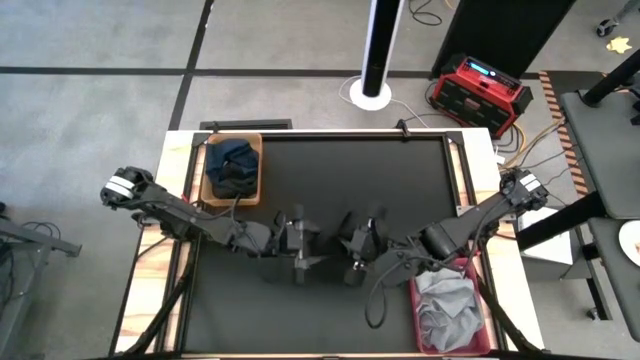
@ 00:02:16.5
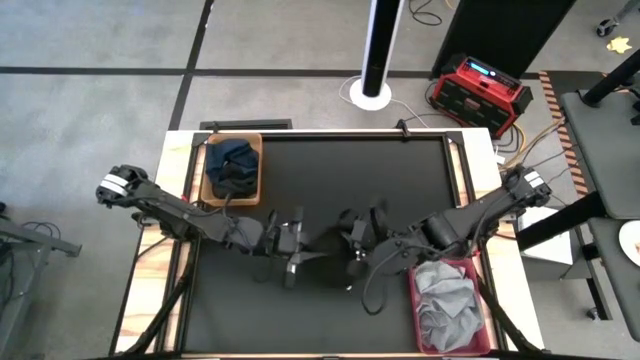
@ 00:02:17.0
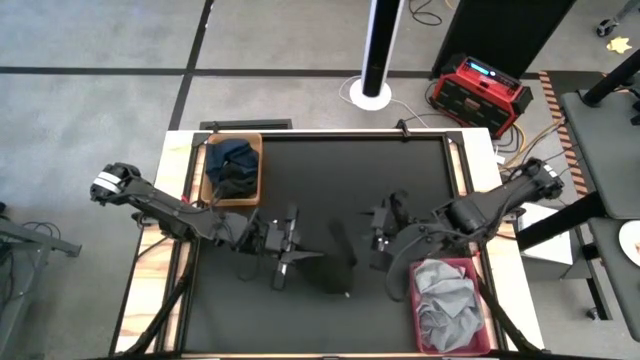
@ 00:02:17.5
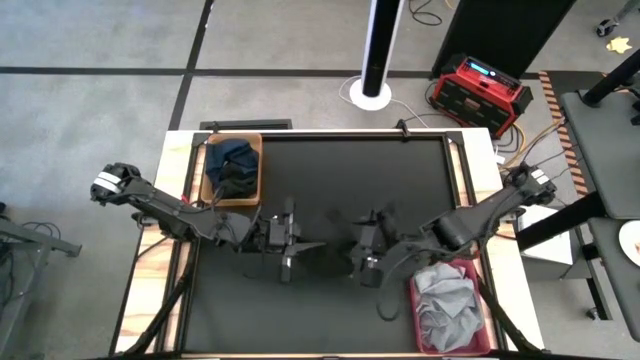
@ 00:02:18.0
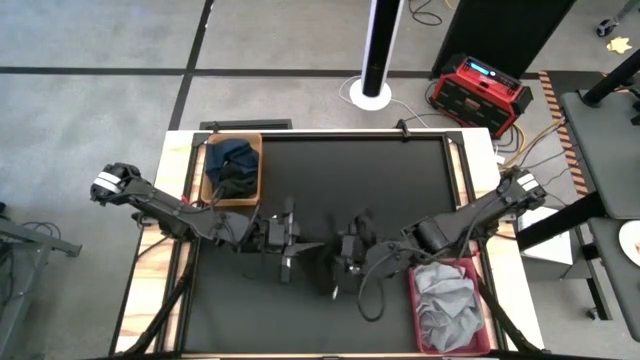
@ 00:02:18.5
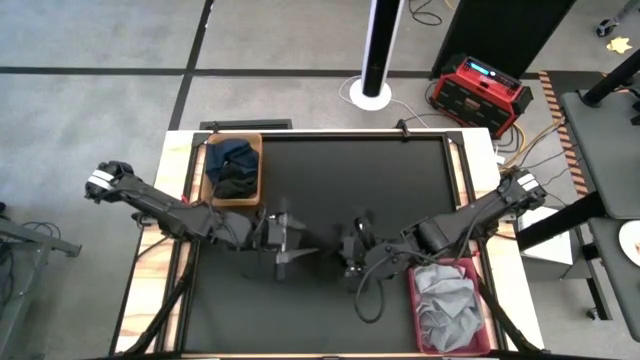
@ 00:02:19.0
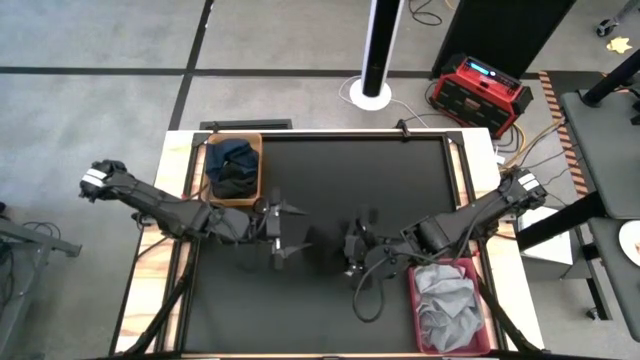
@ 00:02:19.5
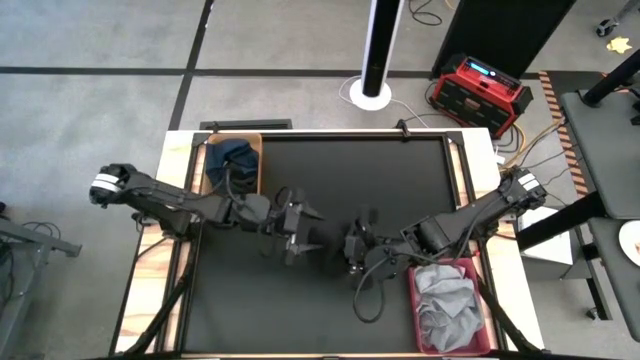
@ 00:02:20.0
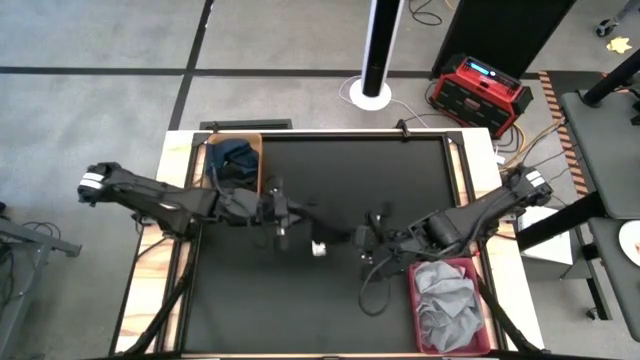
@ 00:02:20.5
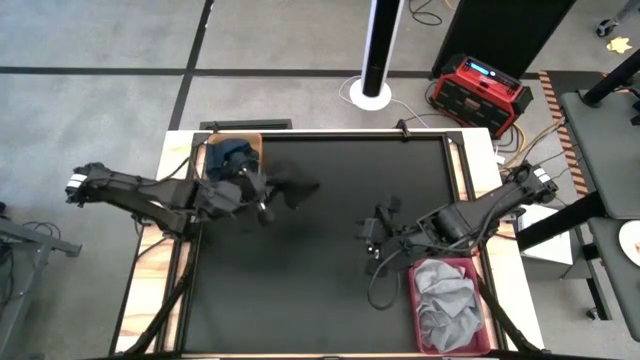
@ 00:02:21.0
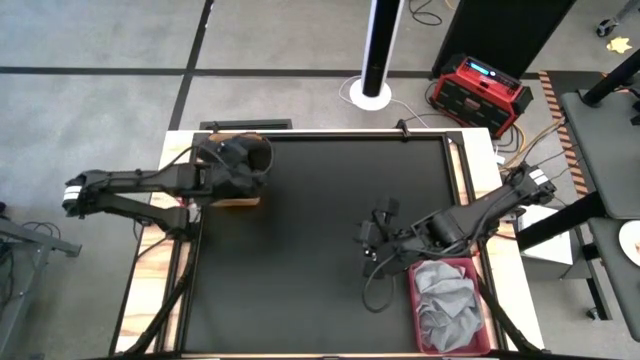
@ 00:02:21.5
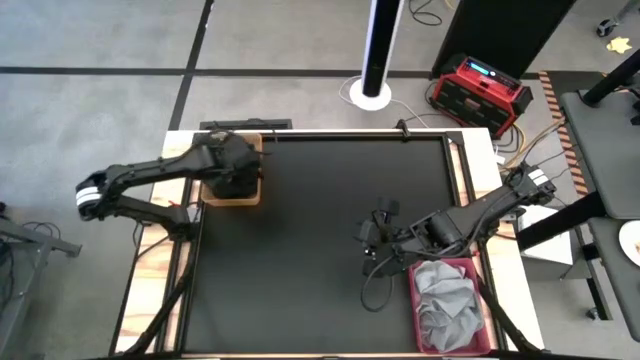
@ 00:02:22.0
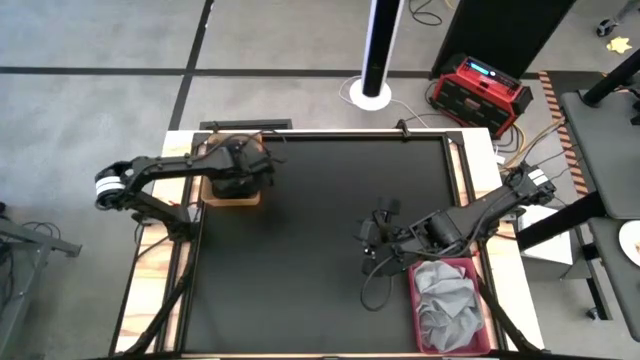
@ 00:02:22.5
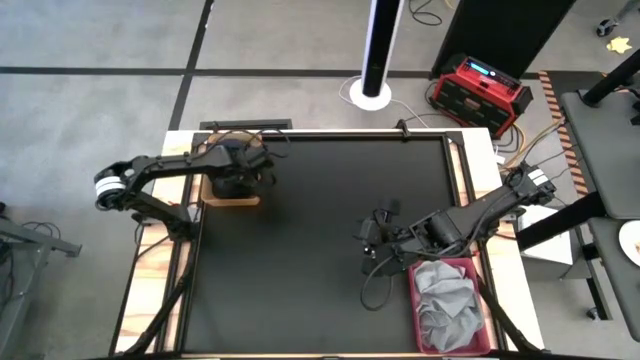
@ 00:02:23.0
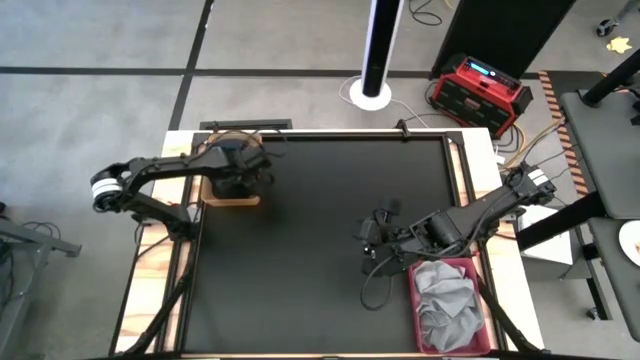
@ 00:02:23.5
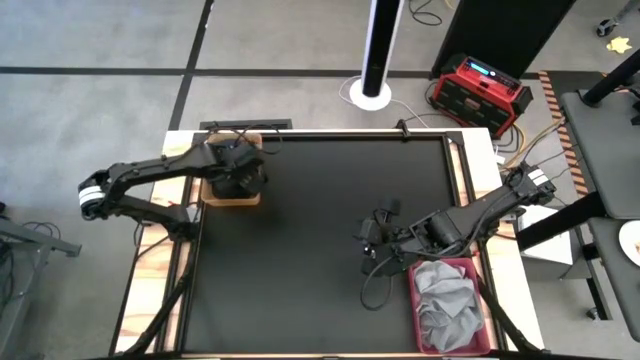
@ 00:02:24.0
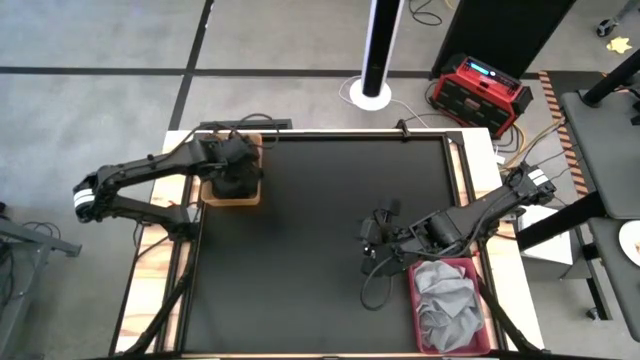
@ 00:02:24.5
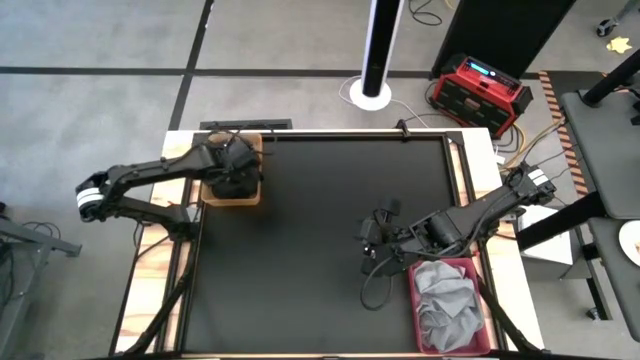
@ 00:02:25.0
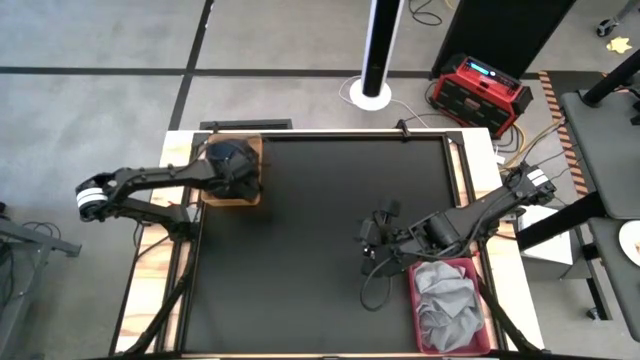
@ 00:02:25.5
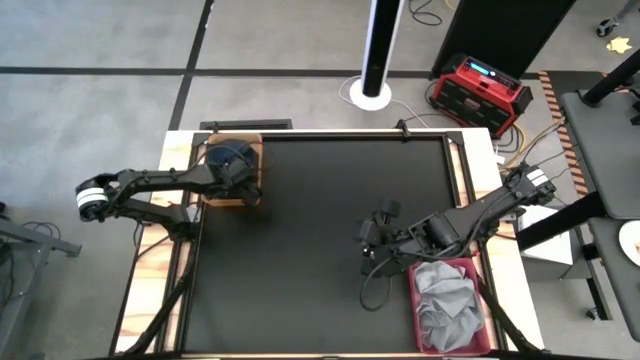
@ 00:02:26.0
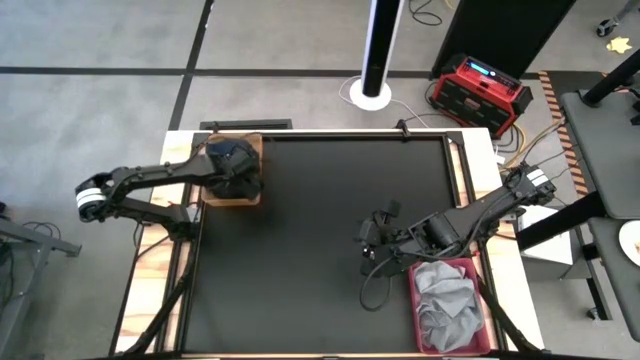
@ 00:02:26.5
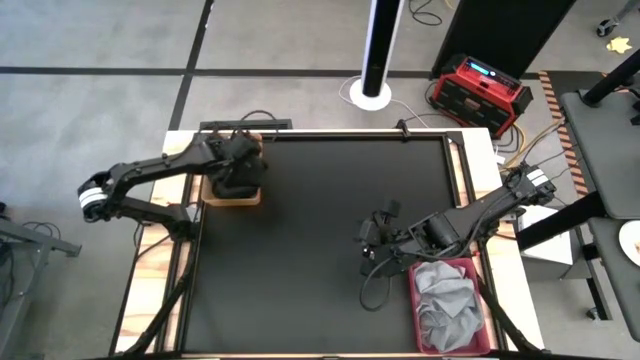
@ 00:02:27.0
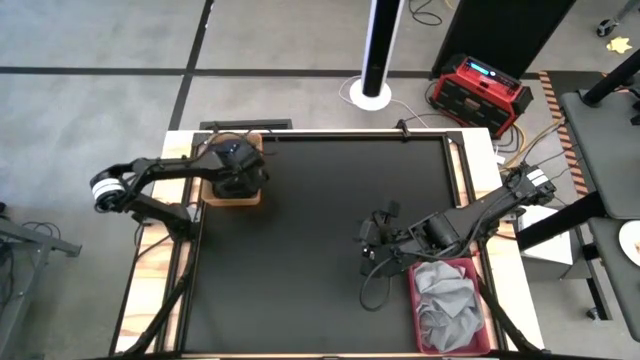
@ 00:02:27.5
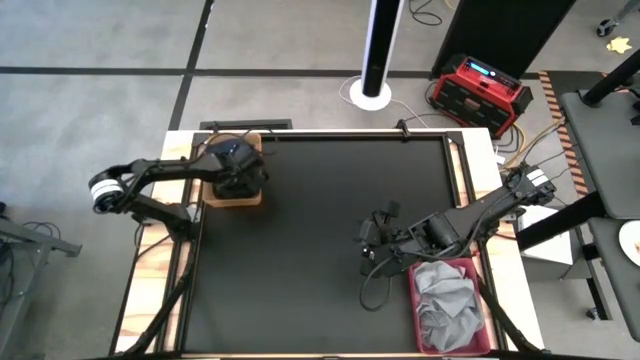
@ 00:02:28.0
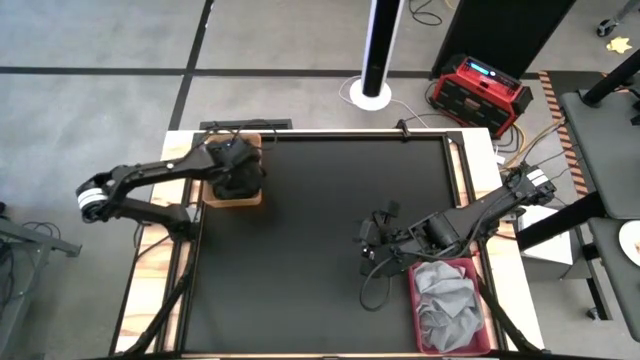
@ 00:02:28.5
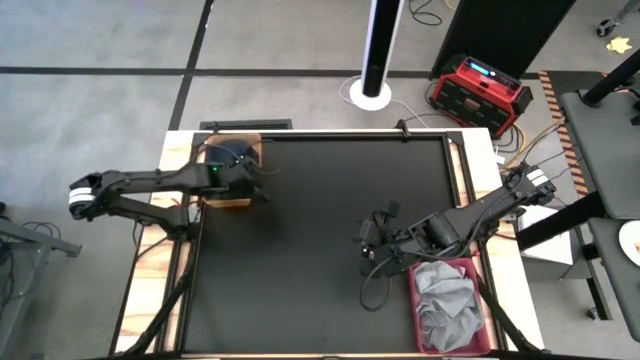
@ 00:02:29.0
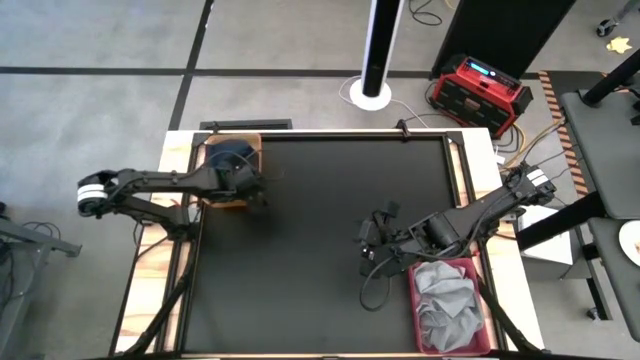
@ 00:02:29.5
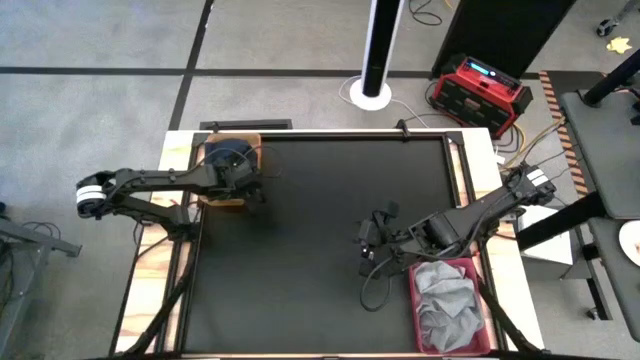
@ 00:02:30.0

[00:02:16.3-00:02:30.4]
Task: Sort towels by color in basket
Put the black towel into the orange bin

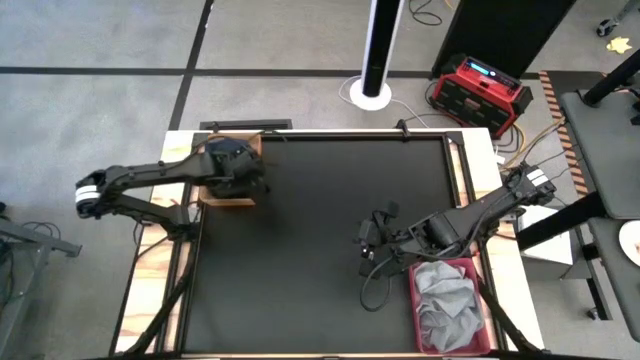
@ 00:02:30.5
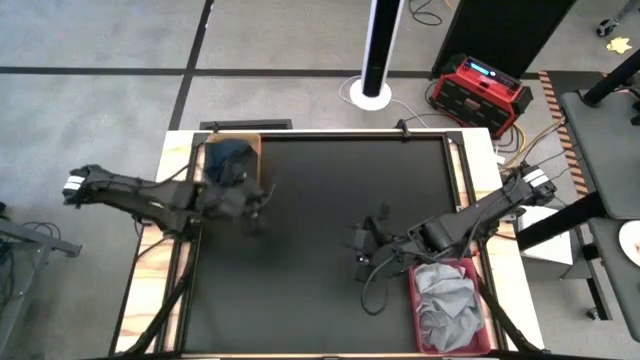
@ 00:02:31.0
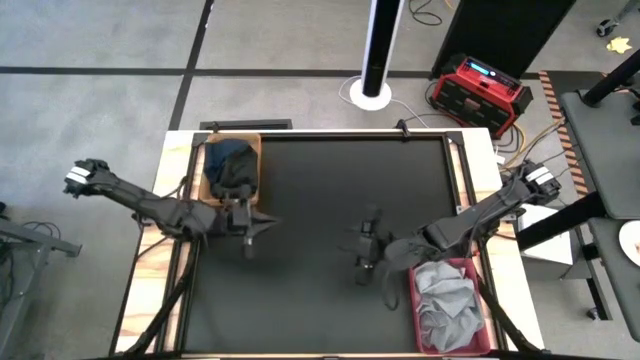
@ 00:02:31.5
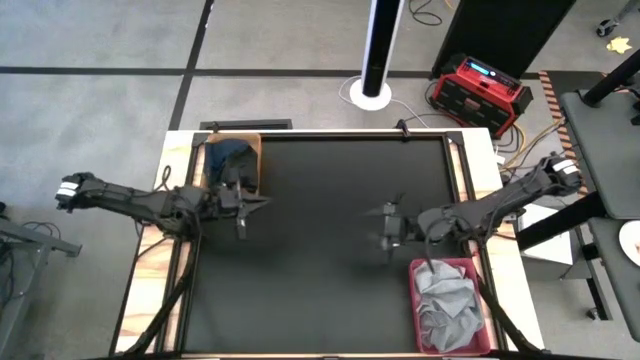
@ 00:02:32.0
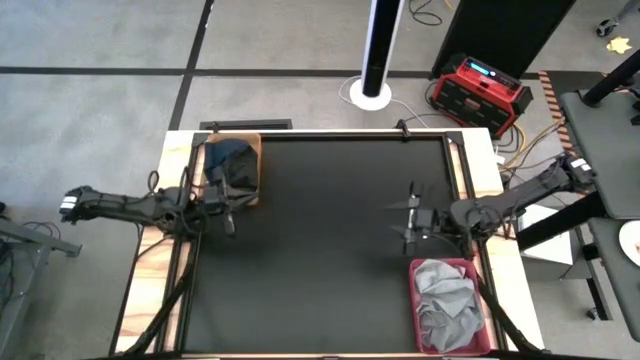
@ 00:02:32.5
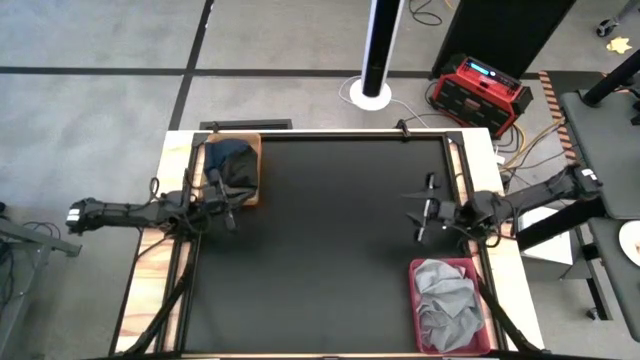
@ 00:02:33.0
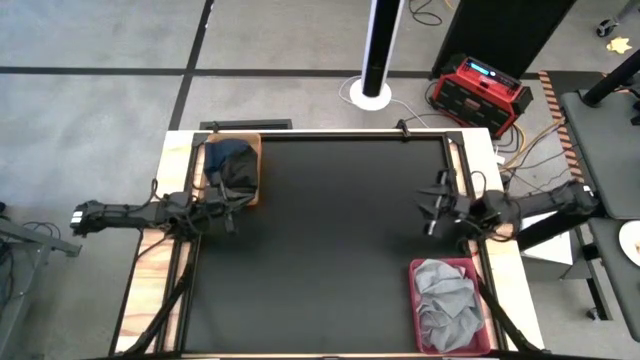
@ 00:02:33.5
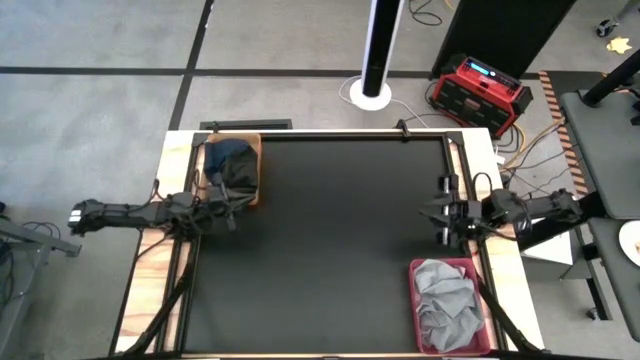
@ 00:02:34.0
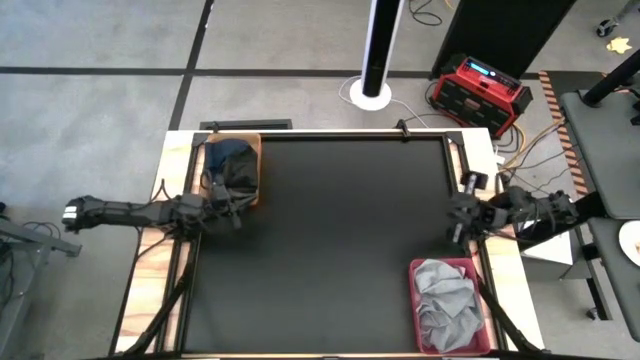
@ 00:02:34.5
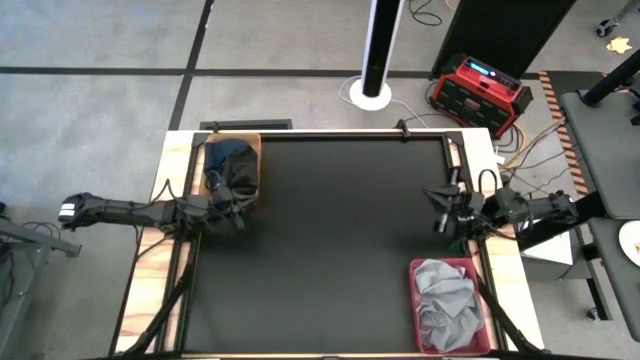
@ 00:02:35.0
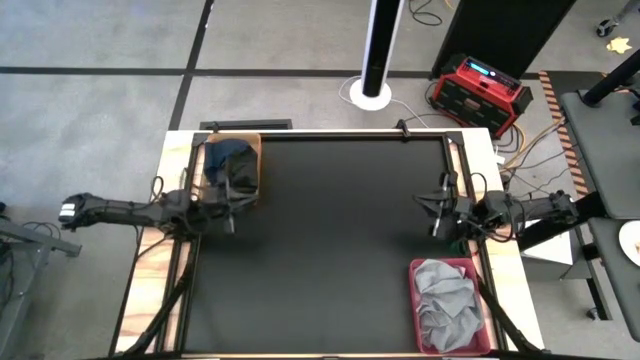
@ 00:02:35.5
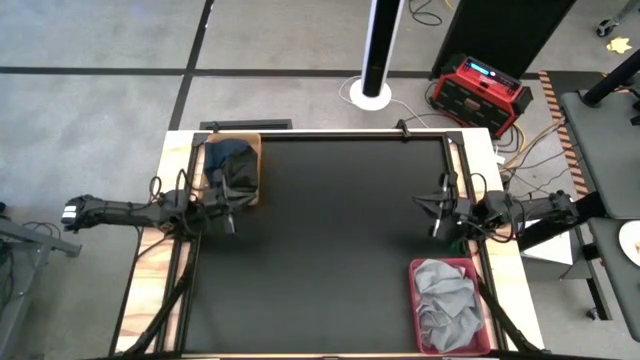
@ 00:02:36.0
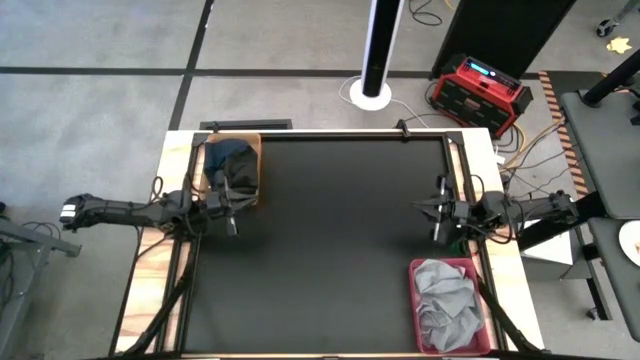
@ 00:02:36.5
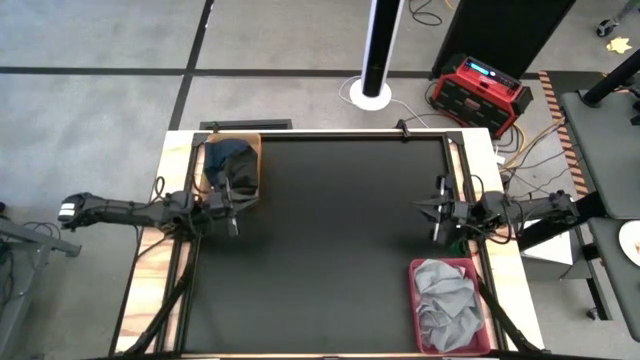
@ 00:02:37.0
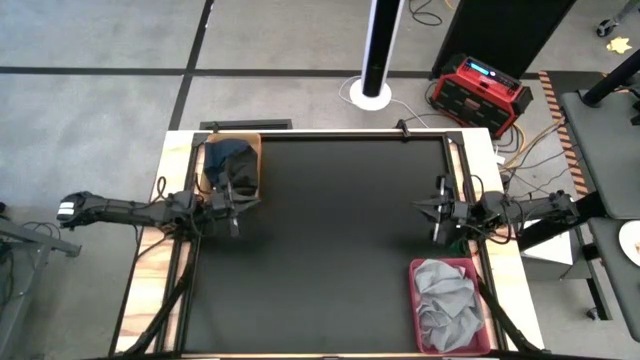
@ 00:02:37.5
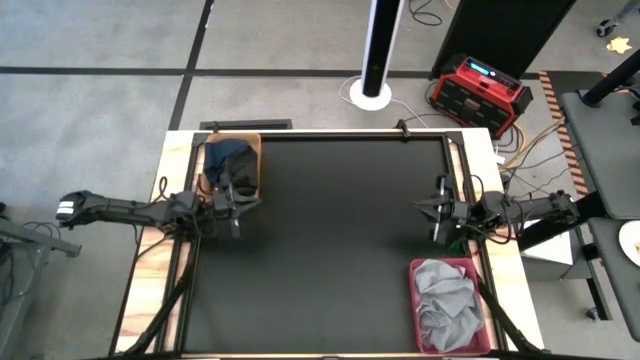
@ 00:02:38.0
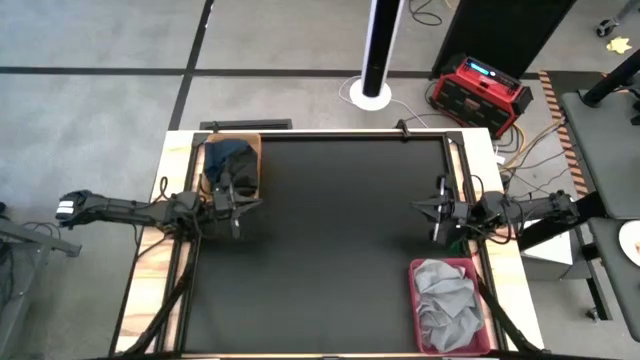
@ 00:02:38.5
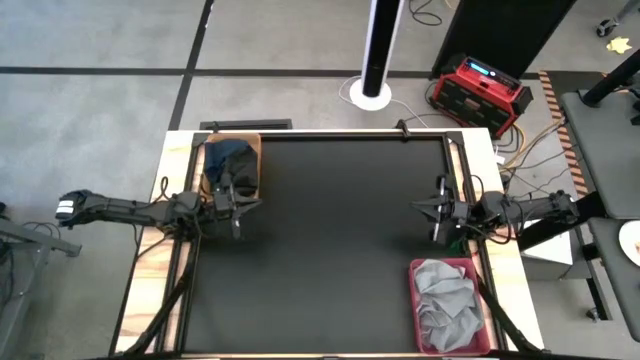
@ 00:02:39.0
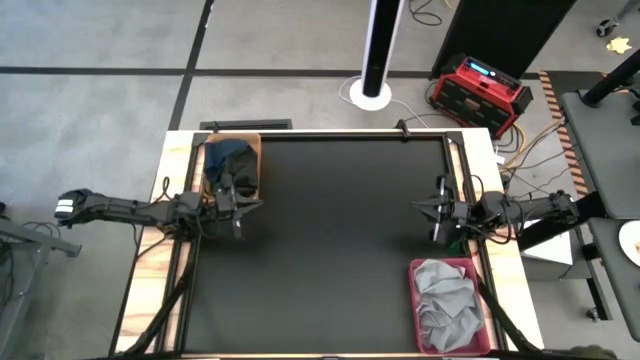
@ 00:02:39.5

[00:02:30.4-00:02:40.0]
Return to Home Position
